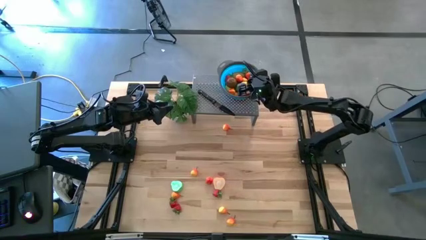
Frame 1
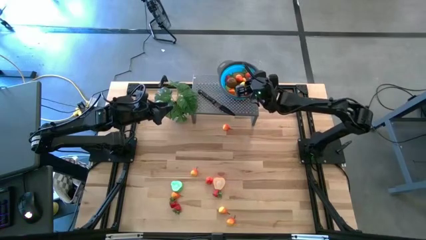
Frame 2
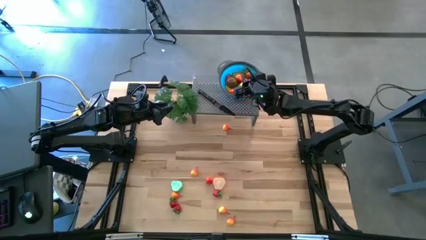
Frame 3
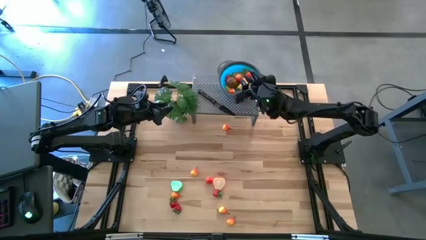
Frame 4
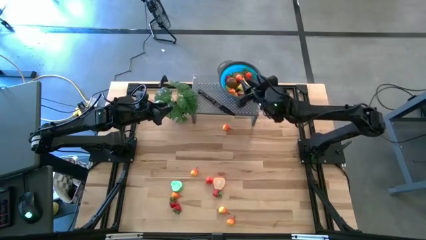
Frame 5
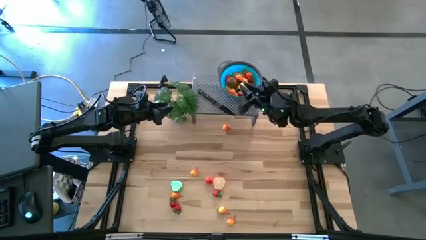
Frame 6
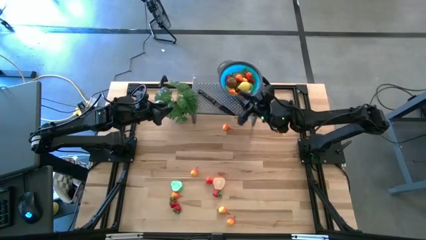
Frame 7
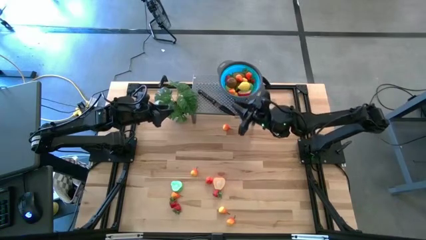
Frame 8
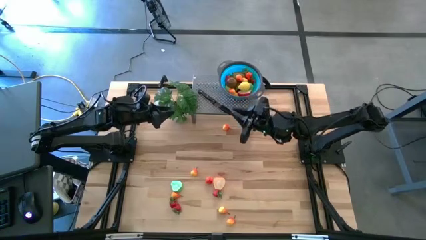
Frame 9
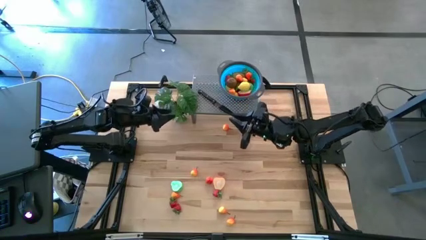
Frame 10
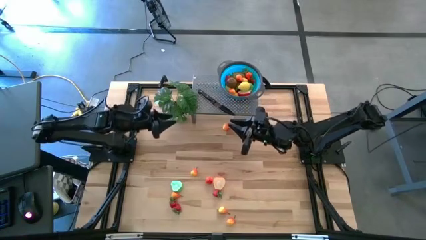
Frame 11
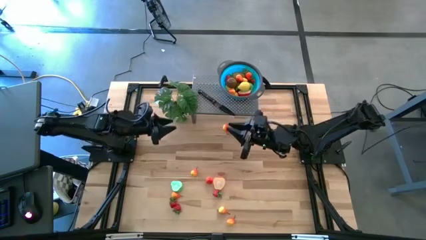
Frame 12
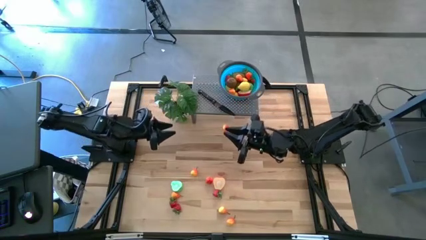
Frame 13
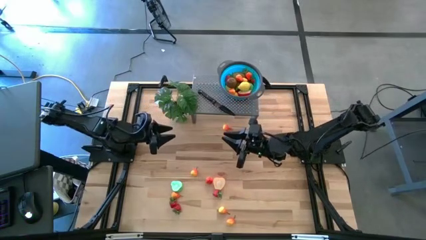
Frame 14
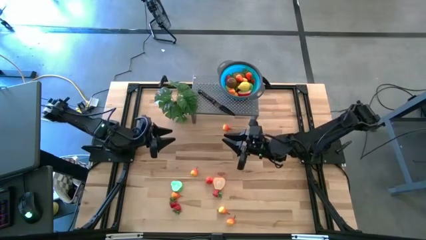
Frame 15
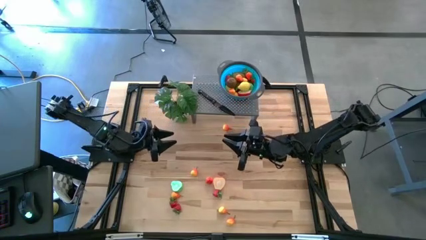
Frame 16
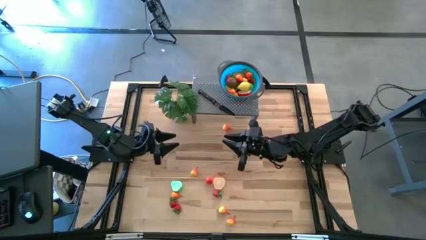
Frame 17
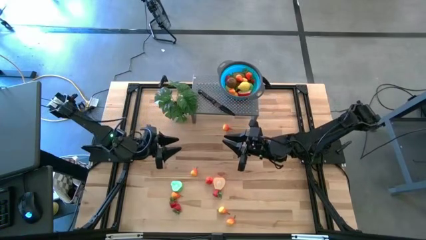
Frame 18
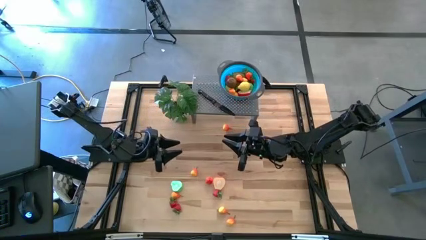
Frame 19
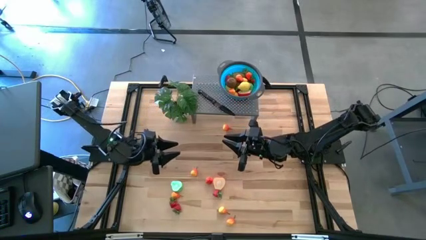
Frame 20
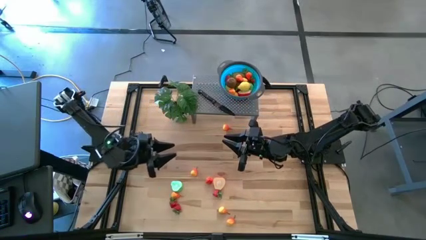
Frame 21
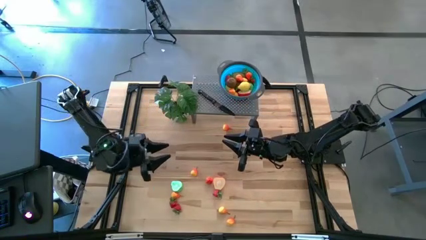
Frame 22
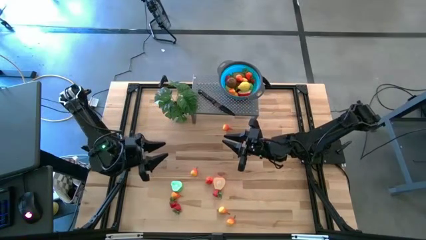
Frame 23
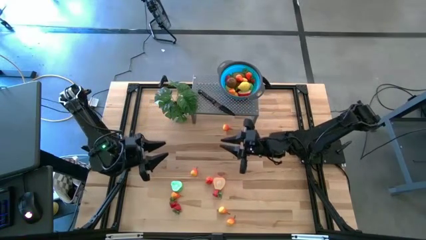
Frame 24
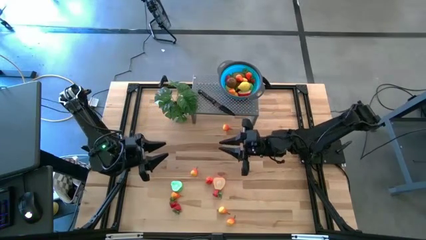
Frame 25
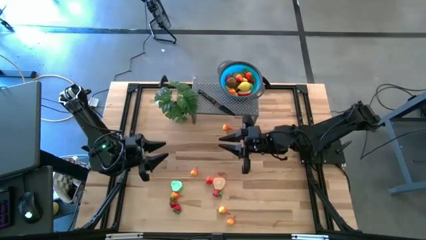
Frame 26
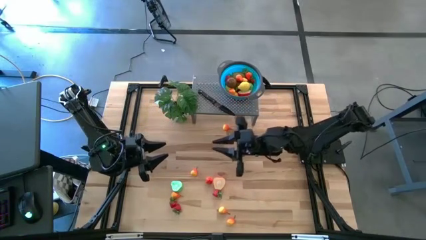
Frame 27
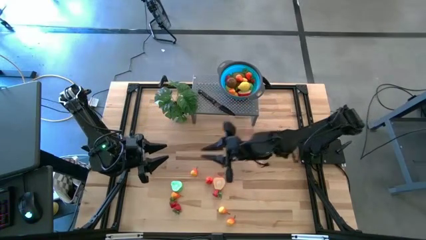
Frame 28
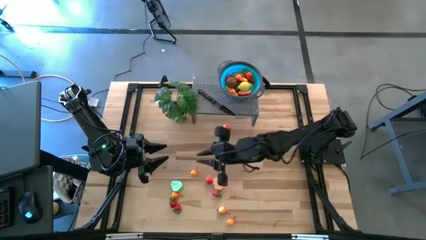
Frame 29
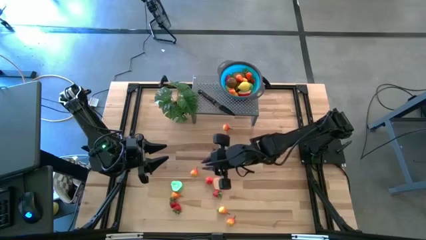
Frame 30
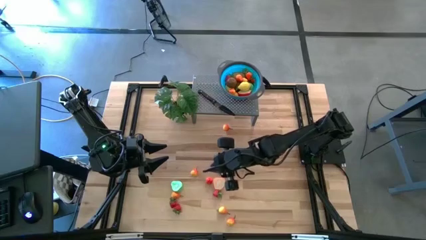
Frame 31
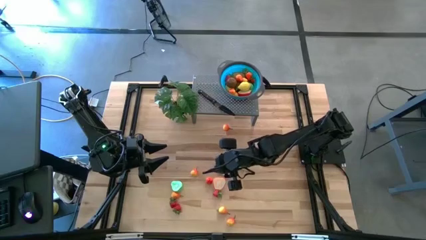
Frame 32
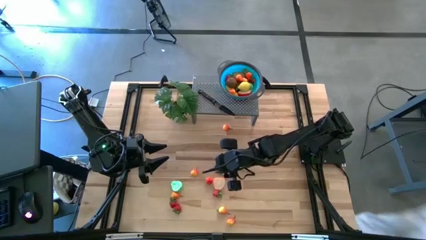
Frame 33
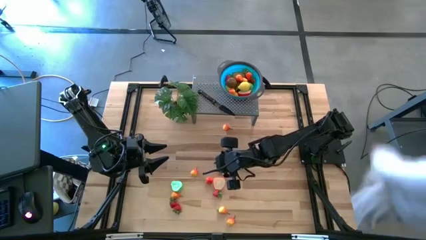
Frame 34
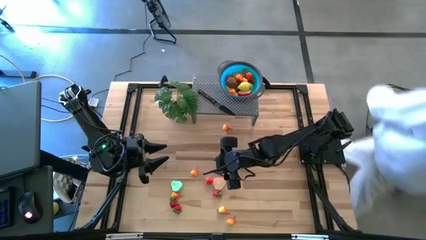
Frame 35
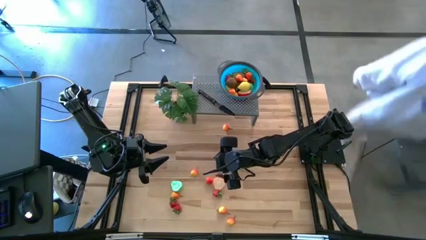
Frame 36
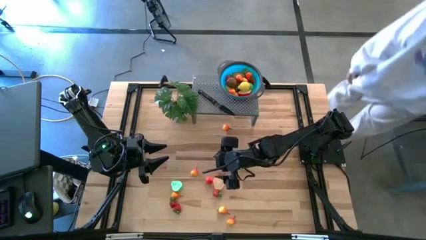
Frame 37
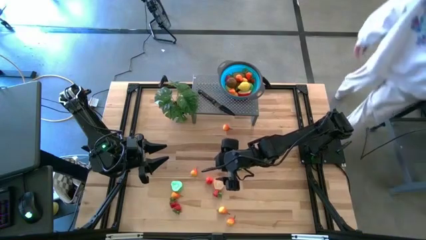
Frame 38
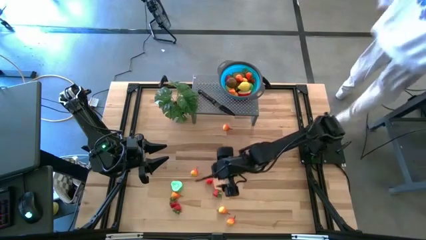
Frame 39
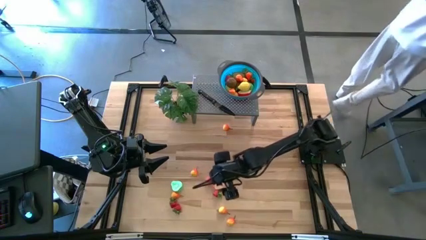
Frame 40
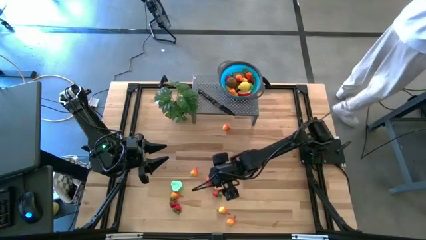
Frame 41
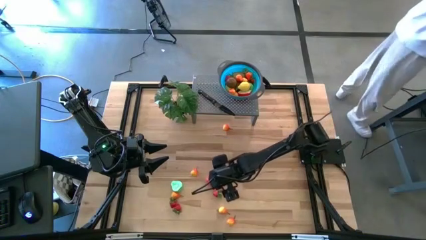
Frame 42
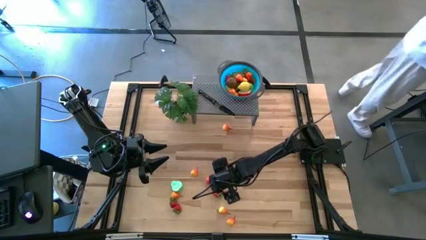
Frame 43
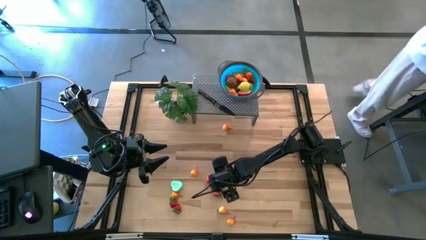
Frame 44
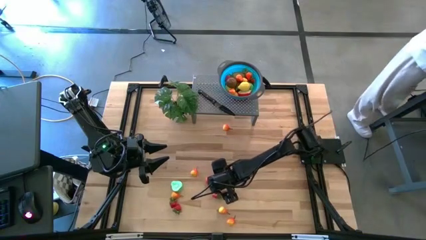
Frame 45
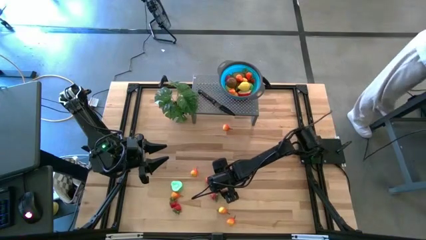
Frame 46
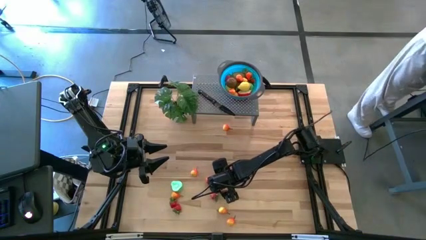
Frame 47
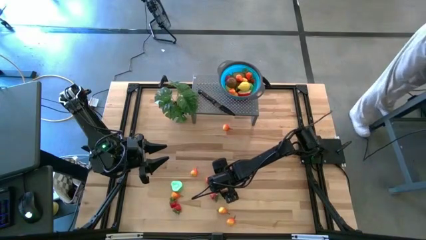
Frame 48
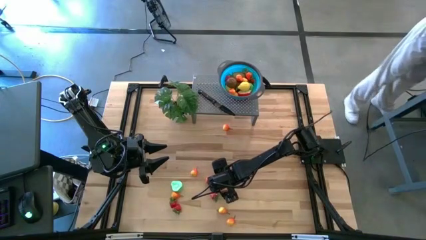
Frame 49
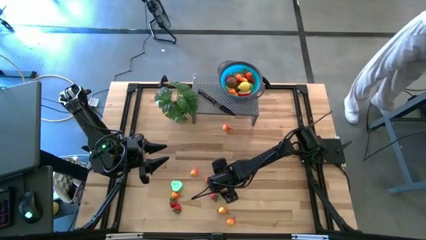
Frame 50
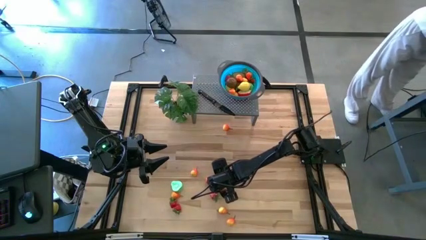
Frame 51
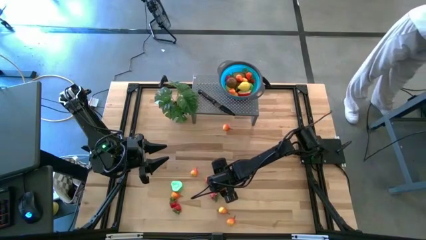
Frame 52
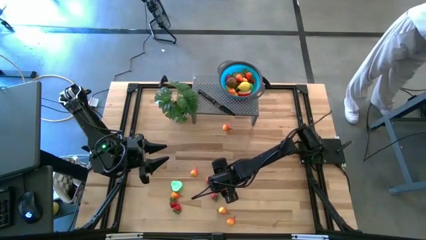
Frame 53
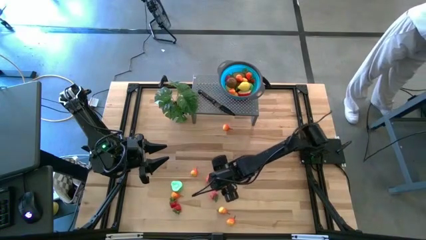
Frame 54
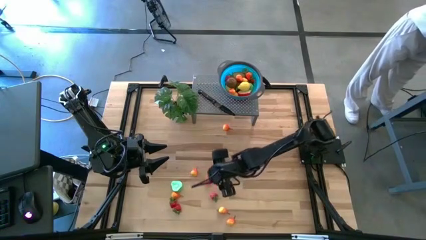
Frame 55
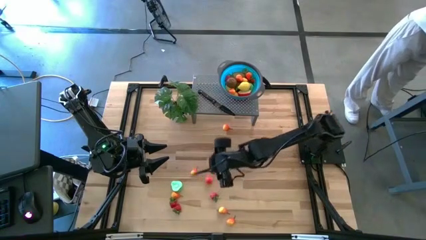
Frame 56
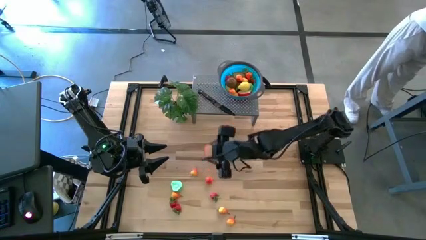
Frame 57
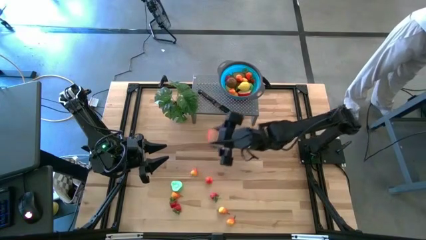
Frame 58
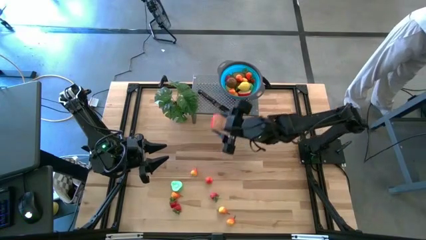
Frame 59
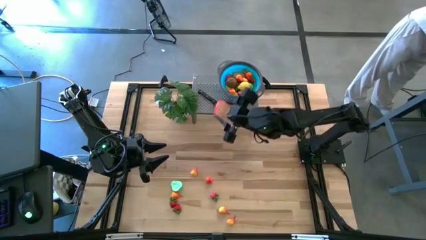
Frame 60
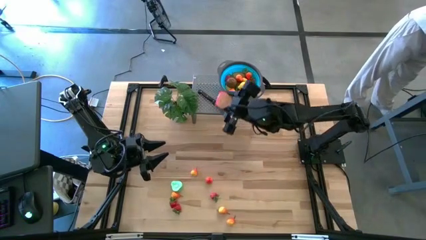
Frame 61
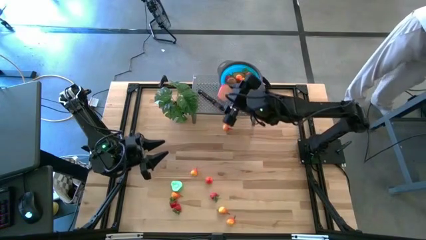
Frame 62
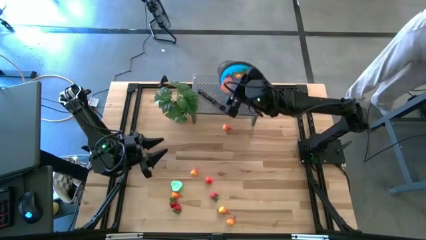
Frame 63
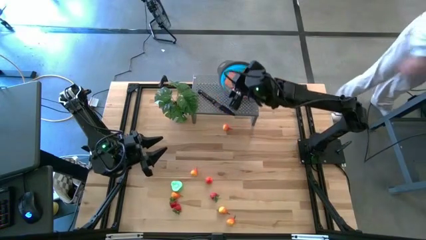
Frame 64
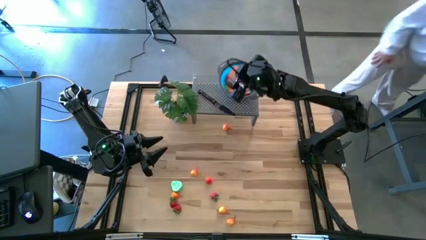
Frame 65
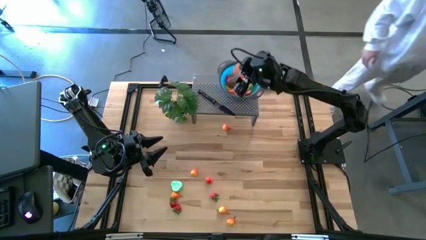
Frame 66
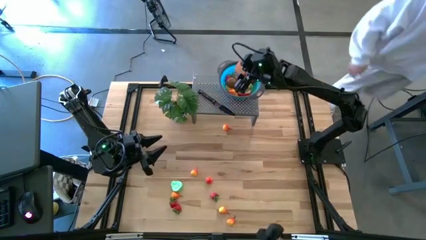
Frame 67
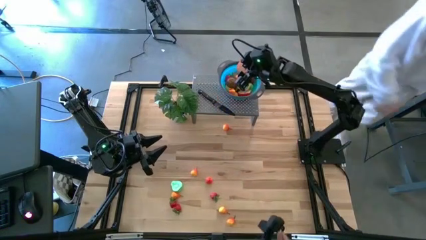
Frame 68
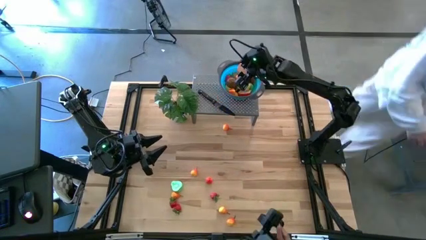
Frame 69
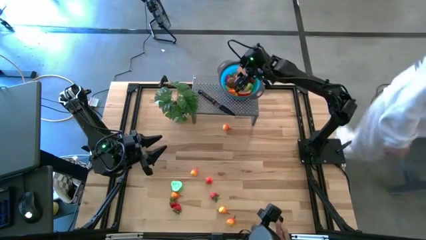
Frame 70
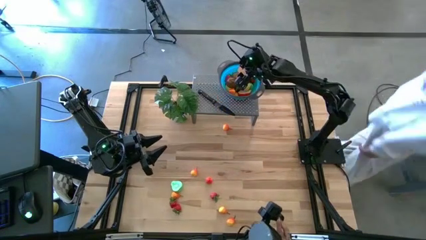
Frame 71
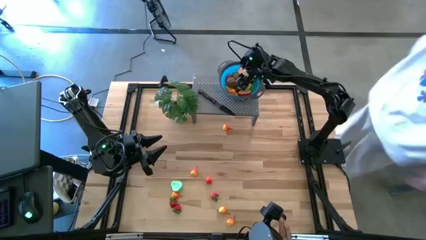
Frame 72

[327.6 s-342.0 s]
Task: Pick & Place Fruit
Put the red apple in the blue bowl on the shelf

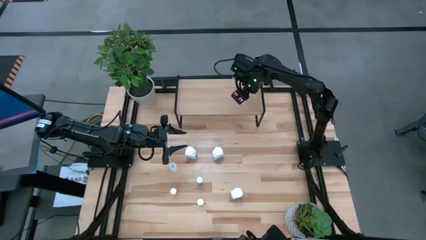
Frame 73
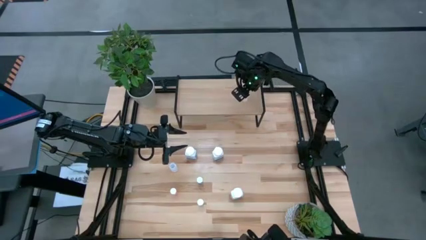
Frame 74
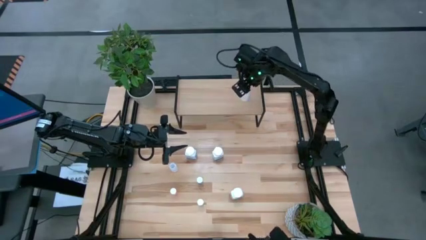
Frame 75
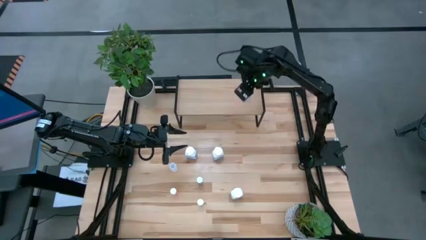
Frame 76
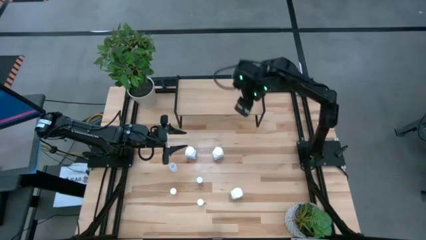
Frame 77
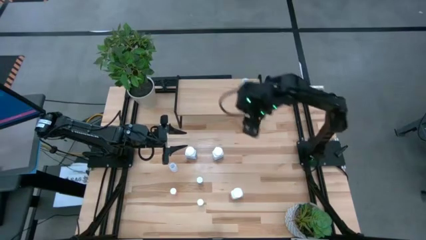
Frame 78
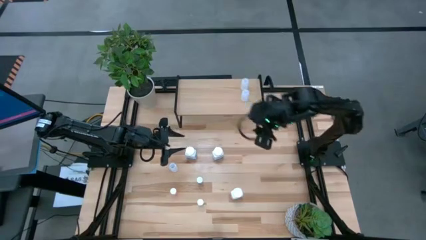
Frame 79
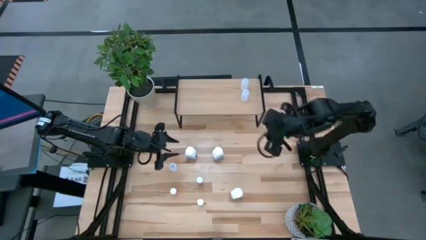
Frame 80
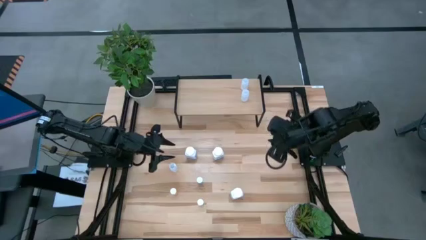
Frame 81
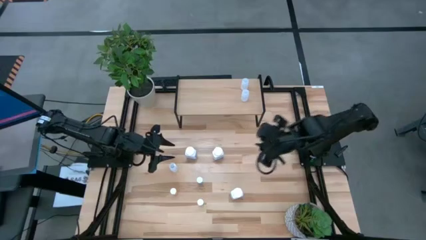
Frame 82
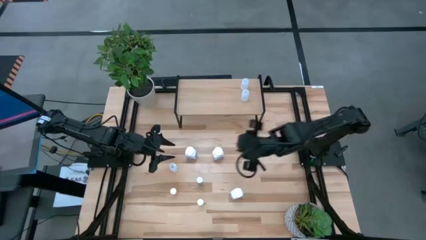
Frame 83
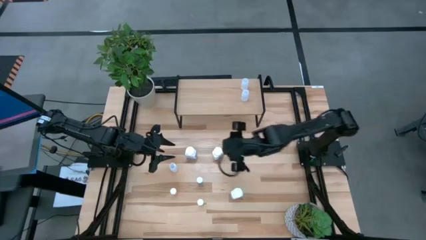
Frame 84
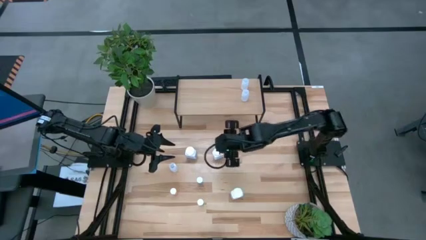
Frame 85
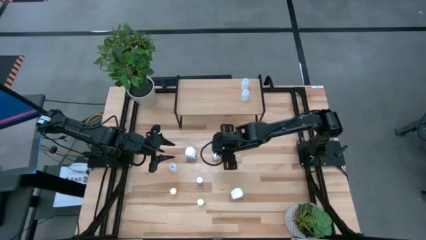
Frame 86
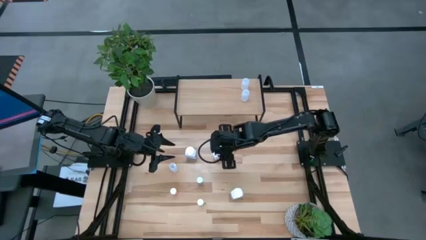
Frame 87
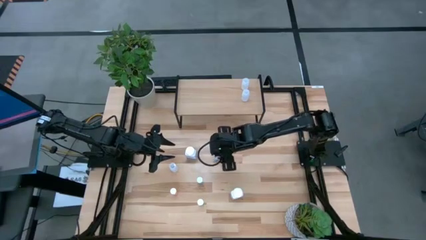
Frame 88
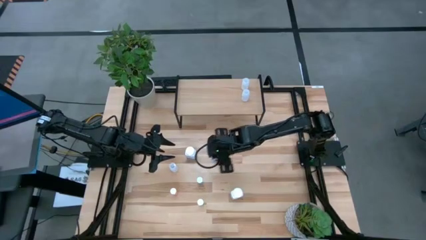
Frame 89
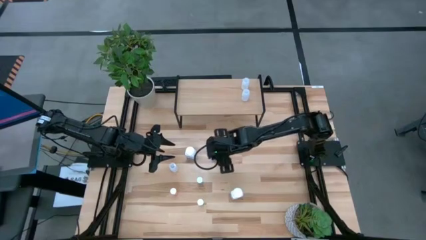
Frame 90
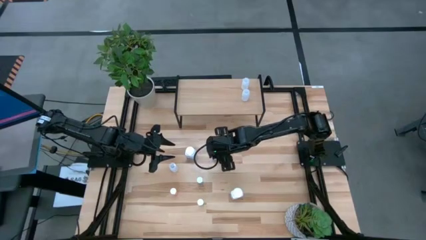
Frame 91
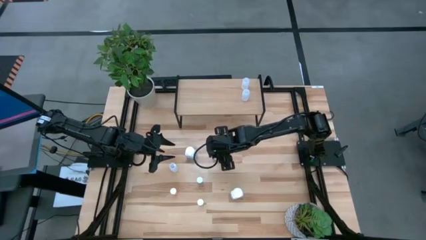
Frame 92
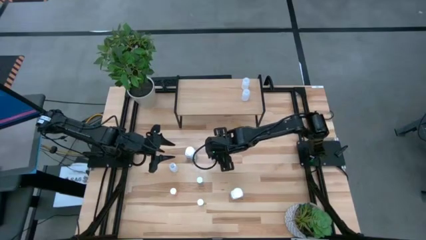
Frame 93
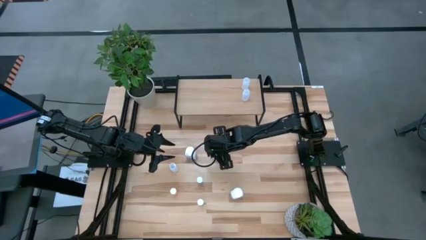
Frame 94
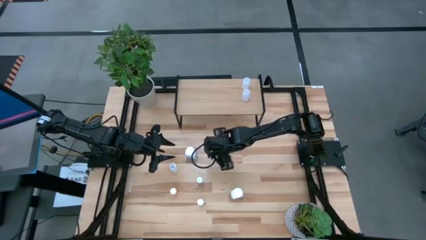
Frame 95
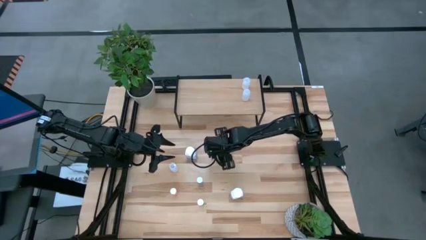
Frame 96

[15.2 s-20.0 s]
Task: Pick and place medicine bottles onto shelf by color
Put the top right white and blue bottle on the shelf
